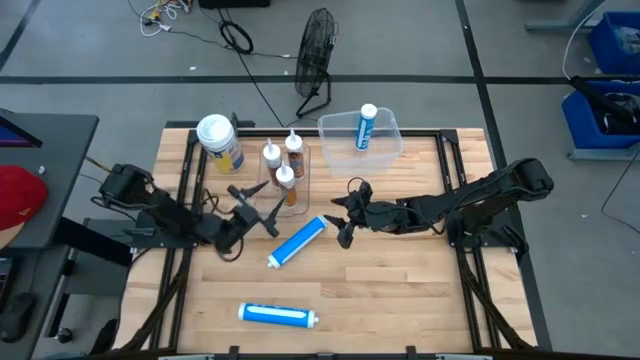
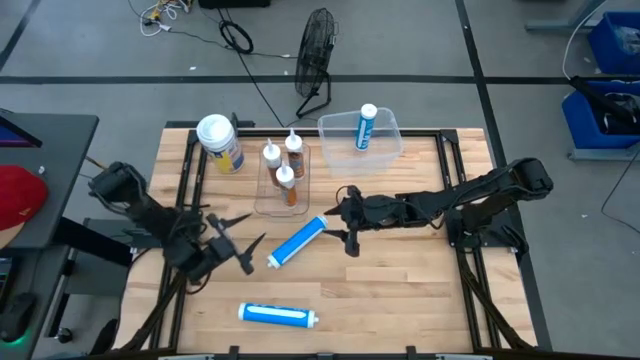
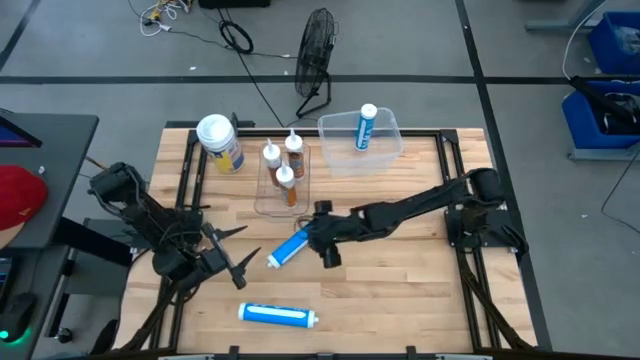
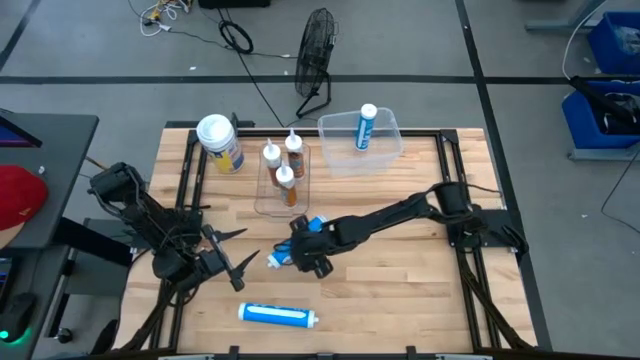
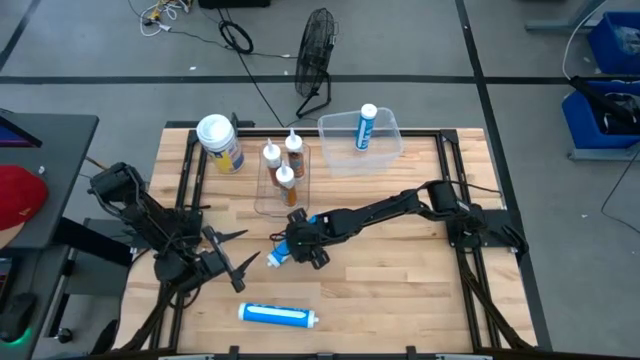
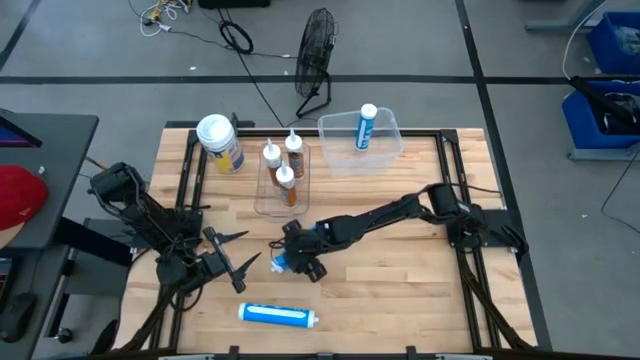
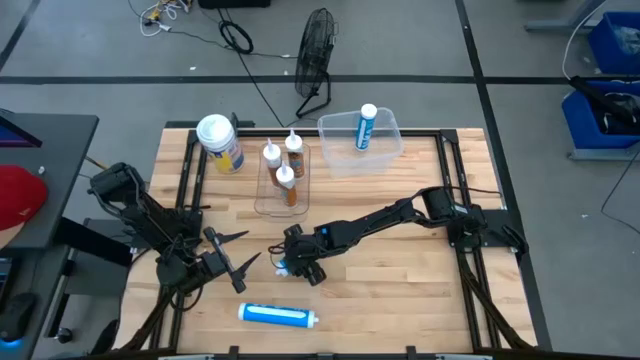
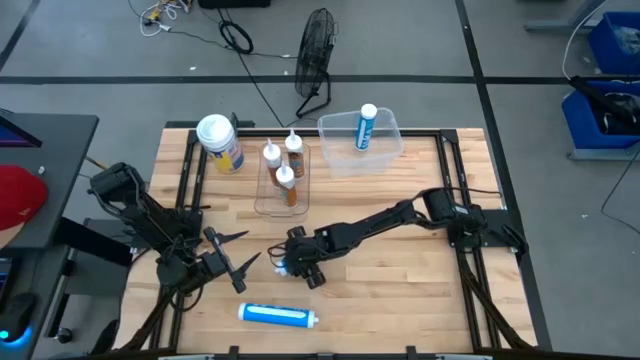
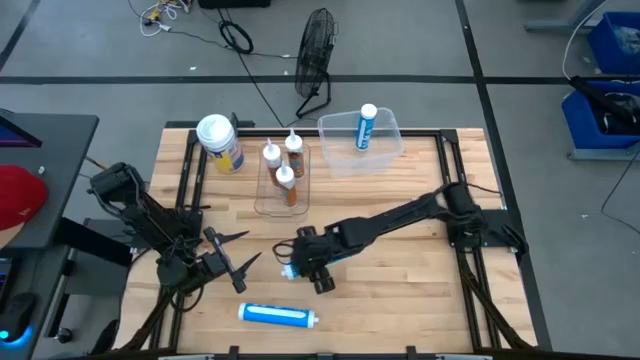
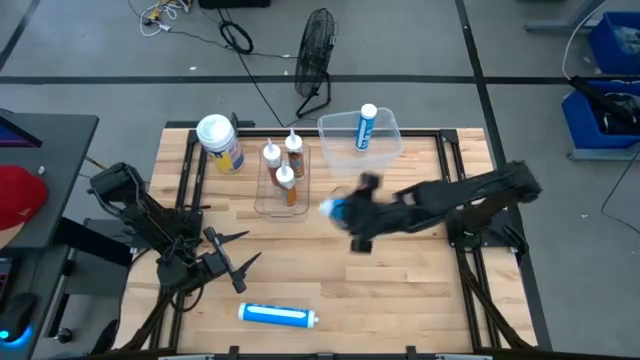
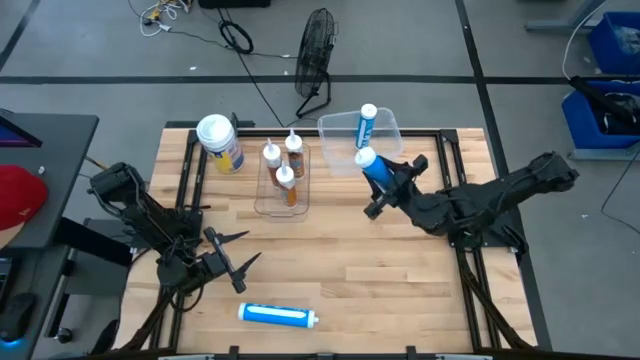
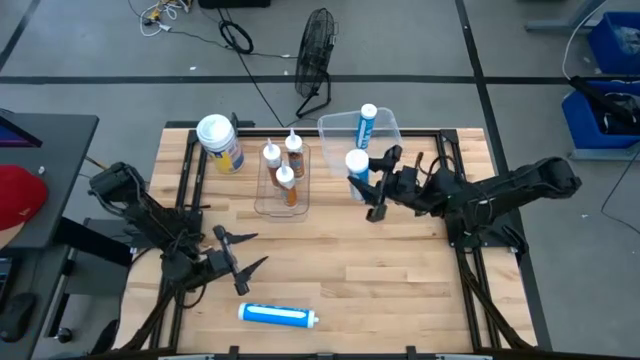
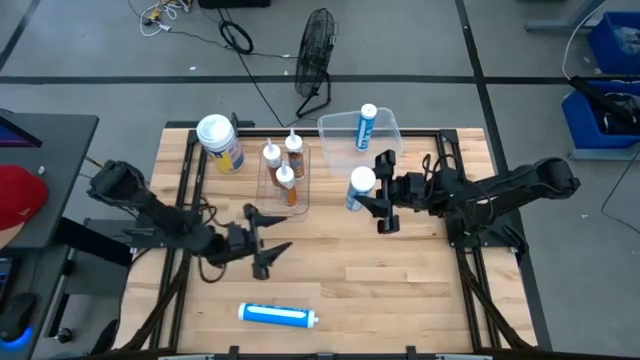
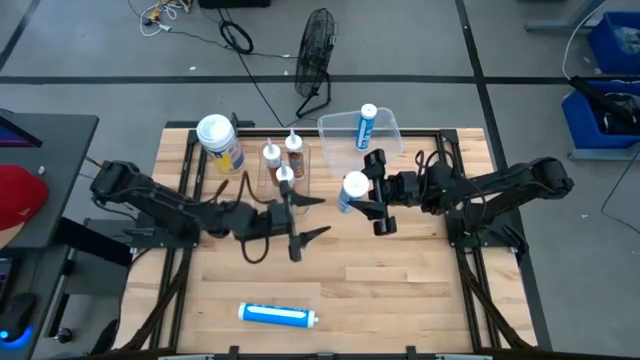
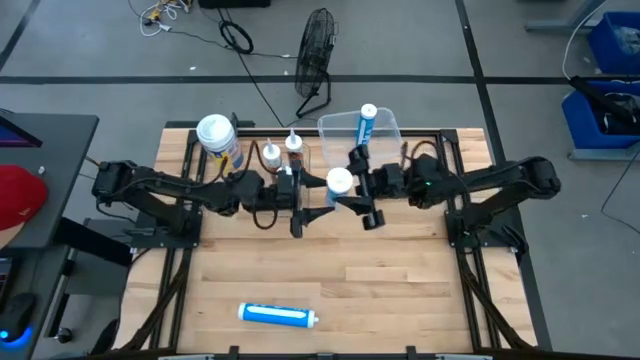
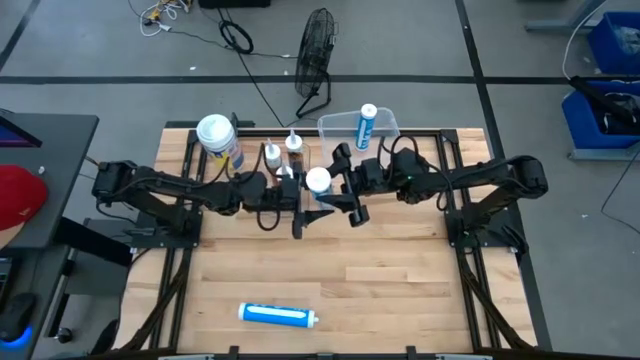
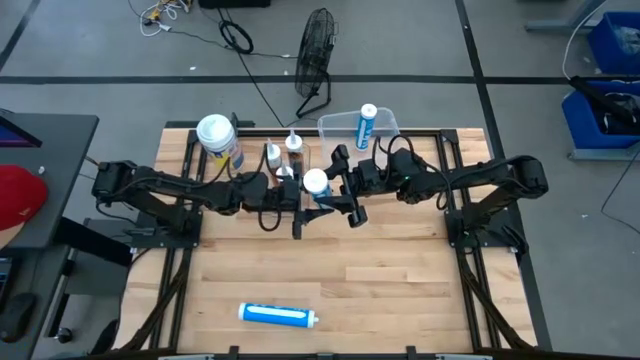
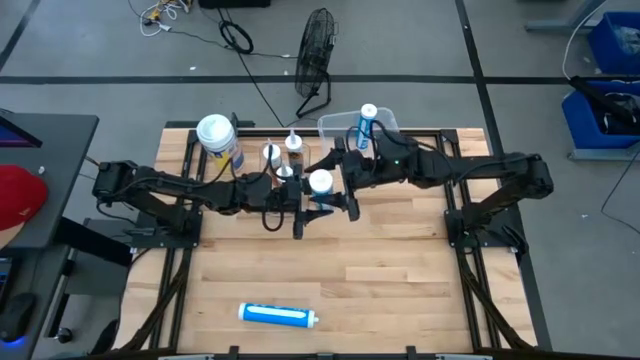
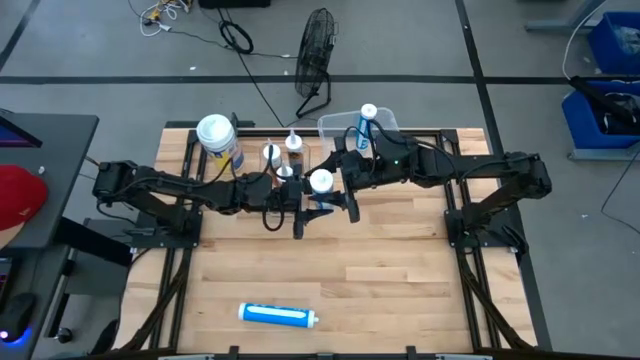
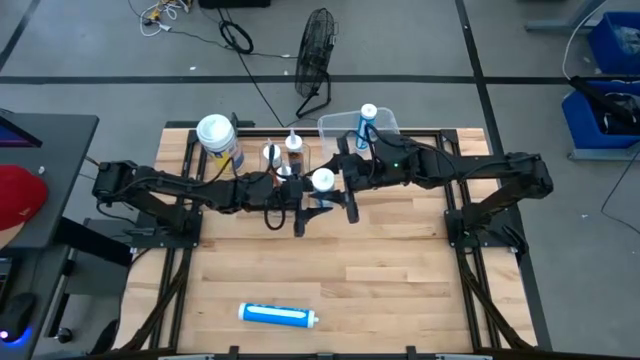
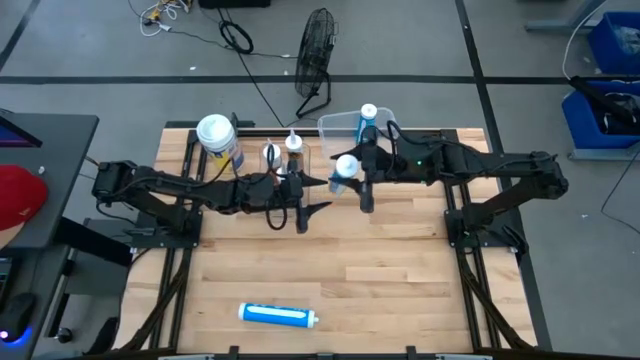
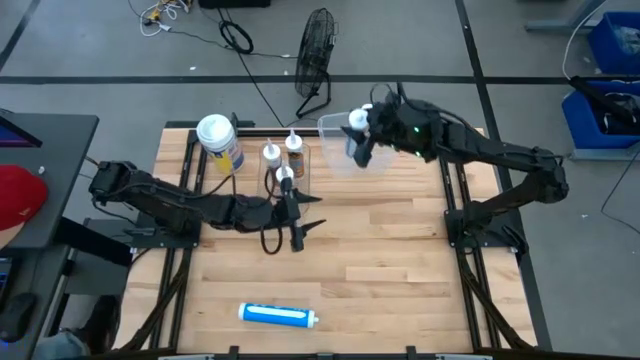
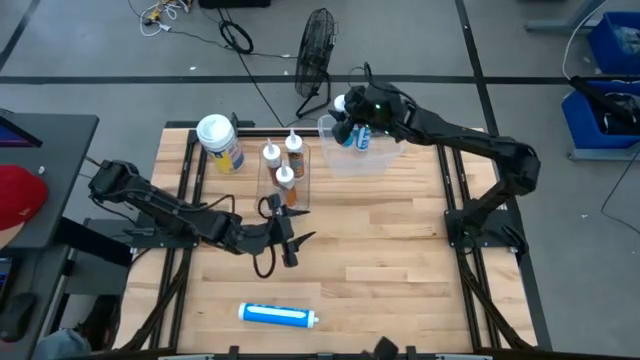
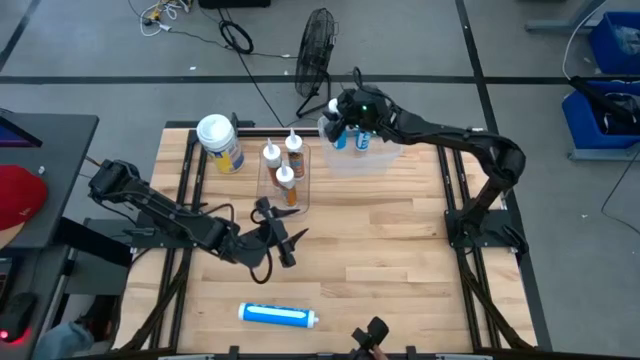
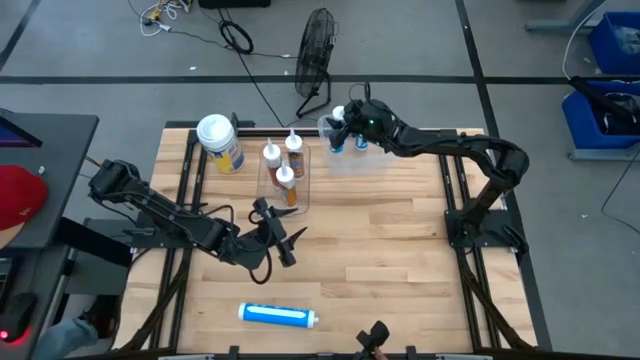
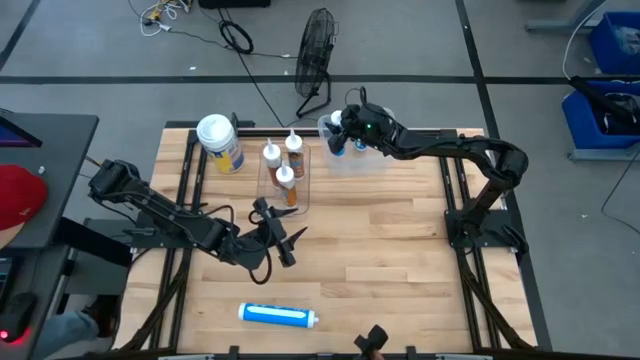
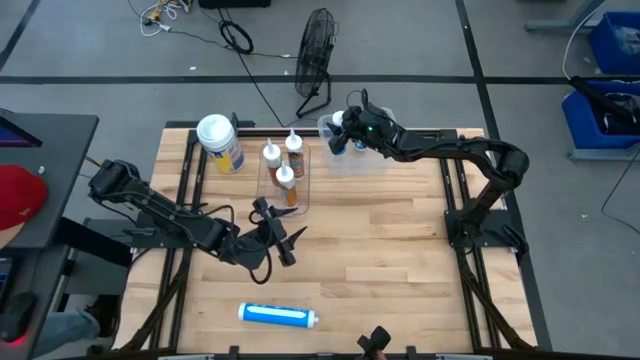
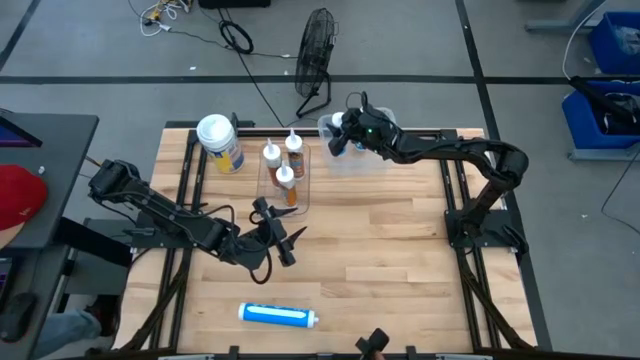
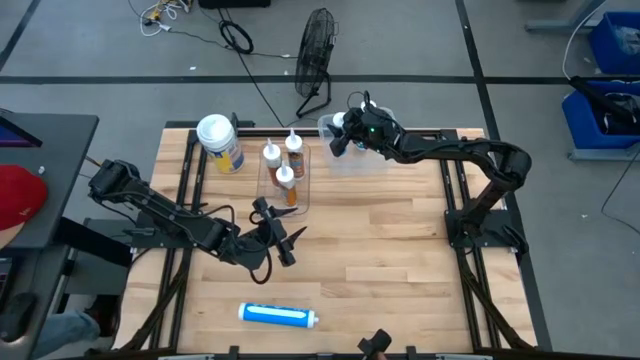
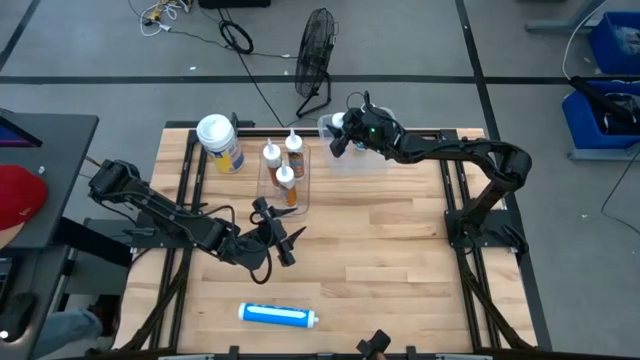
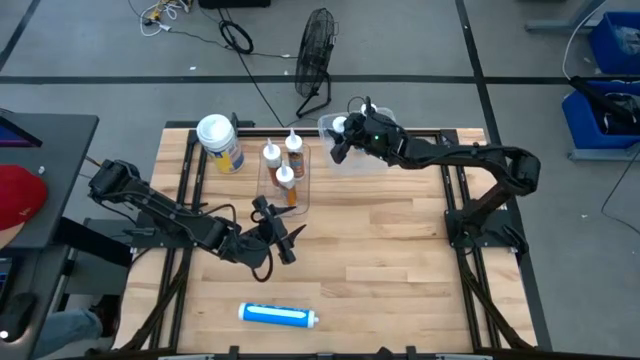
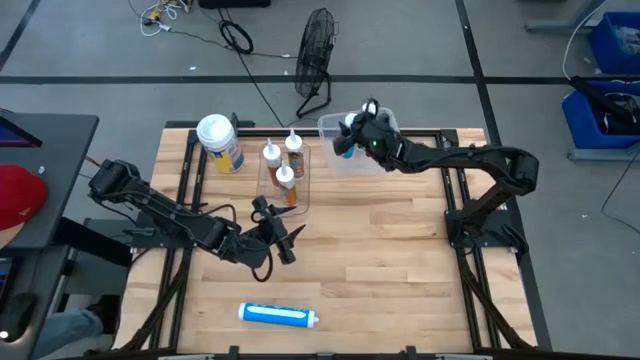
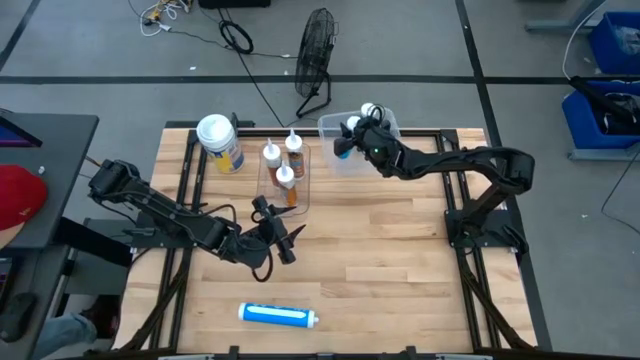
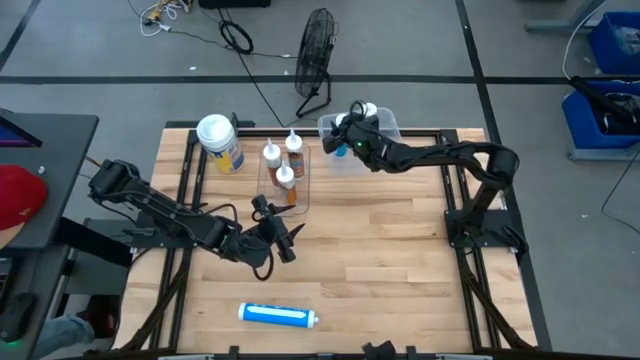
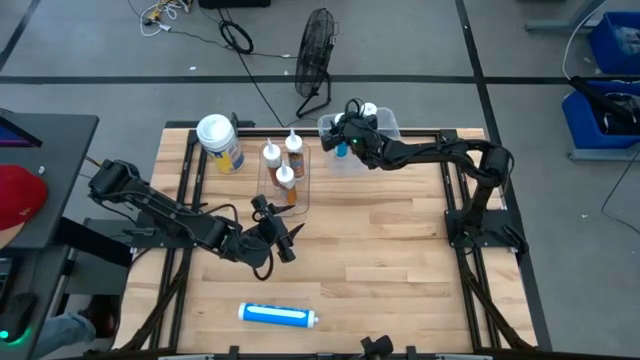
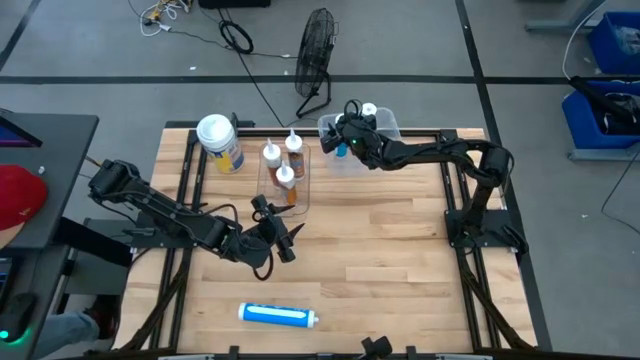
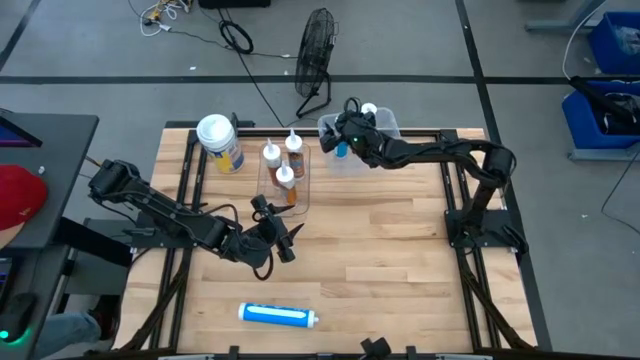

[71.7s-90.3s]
Task: Pick & place silicon tubes, Sealant and Lysol wipes
Put the top blue sealant into the white bin
